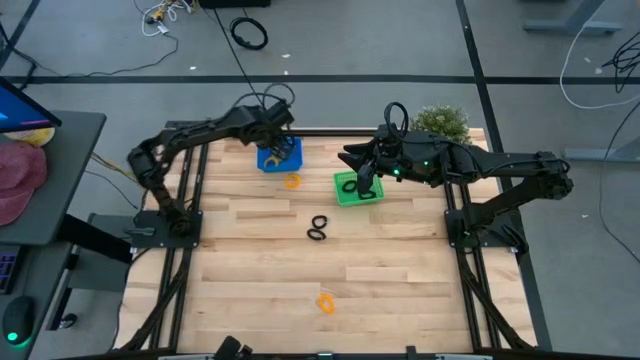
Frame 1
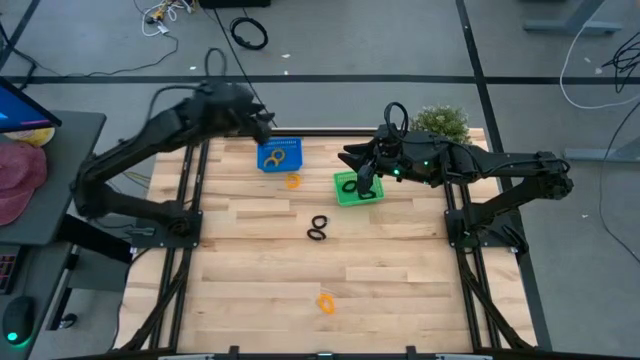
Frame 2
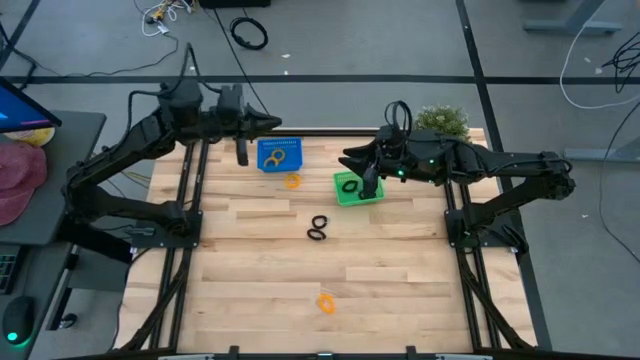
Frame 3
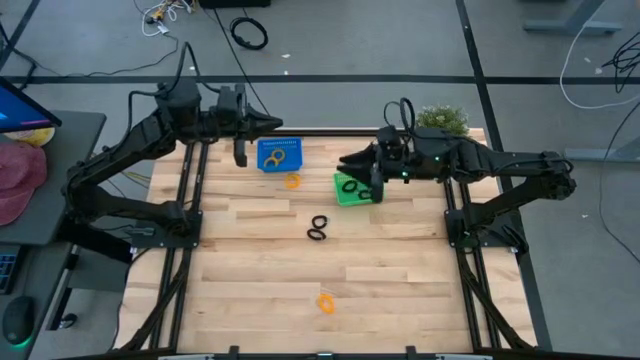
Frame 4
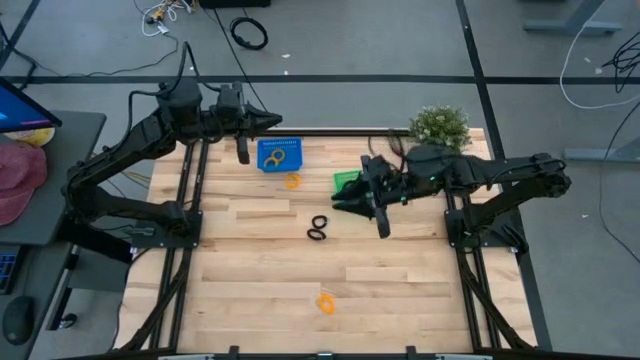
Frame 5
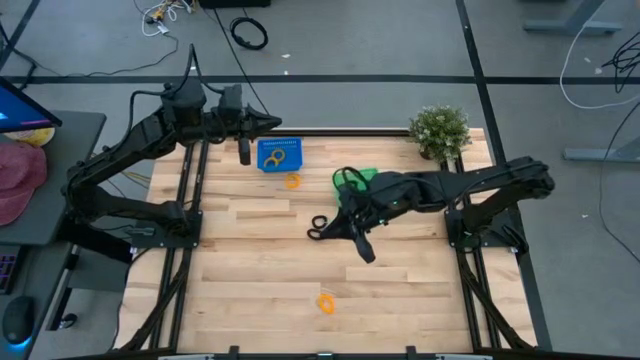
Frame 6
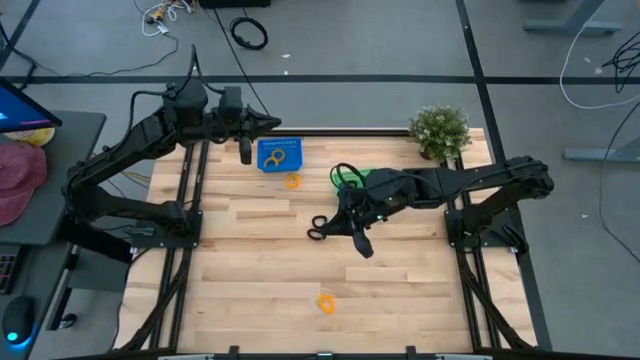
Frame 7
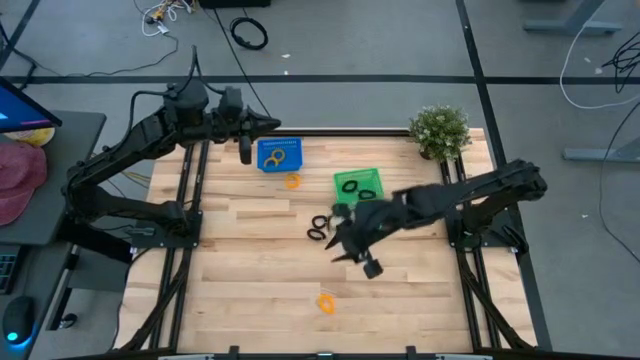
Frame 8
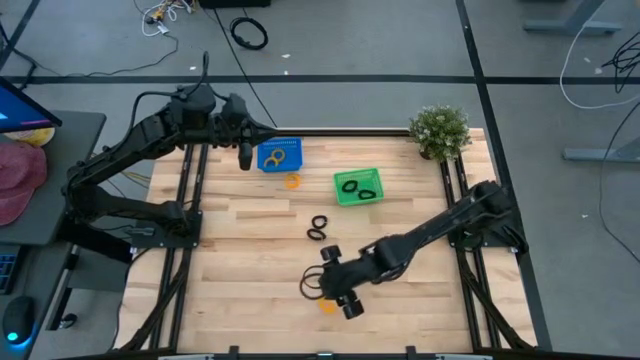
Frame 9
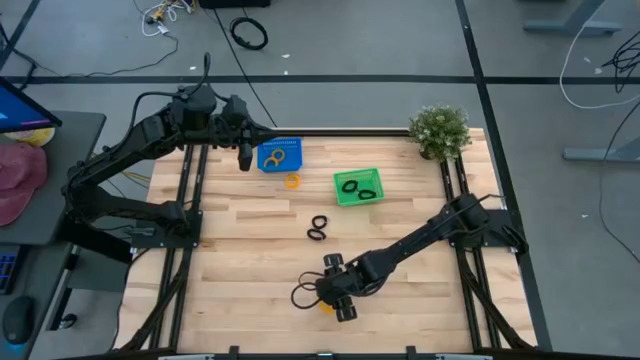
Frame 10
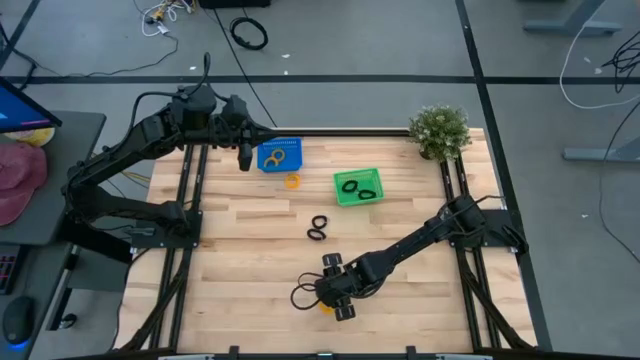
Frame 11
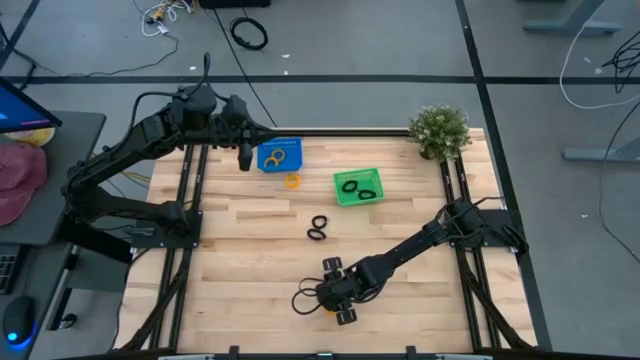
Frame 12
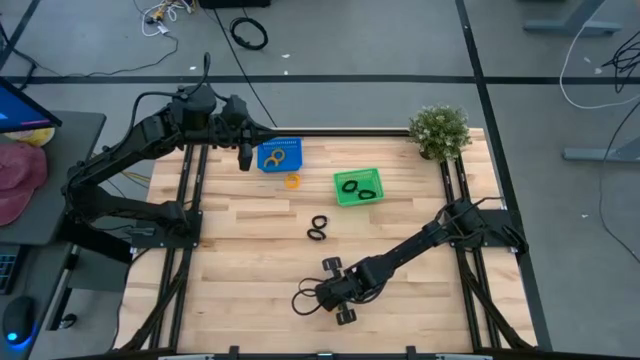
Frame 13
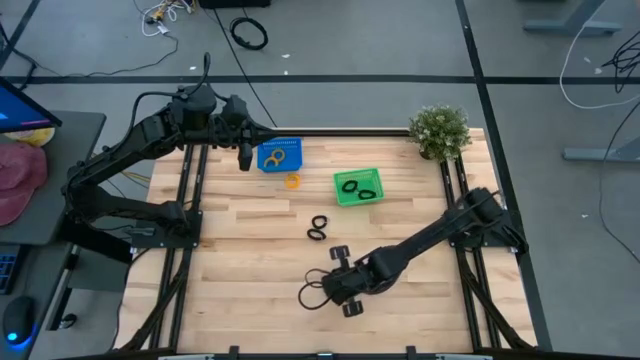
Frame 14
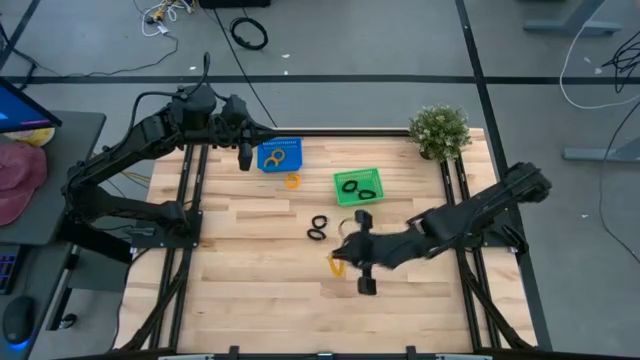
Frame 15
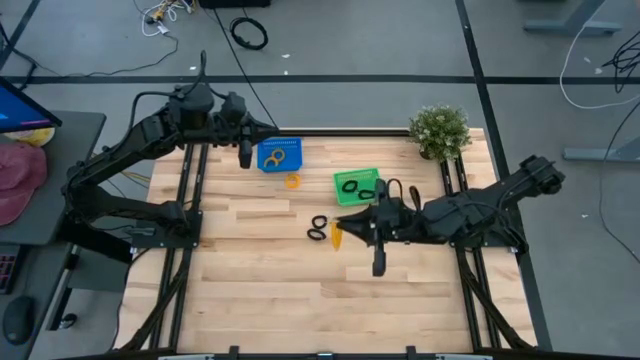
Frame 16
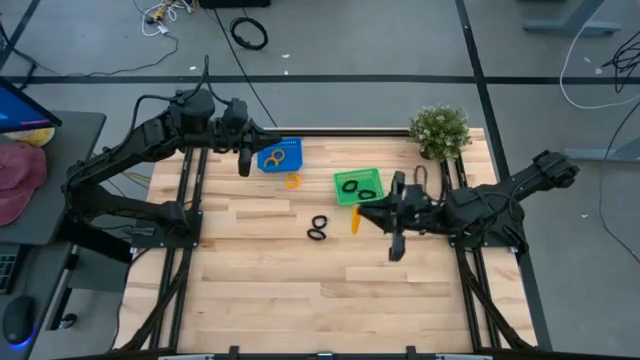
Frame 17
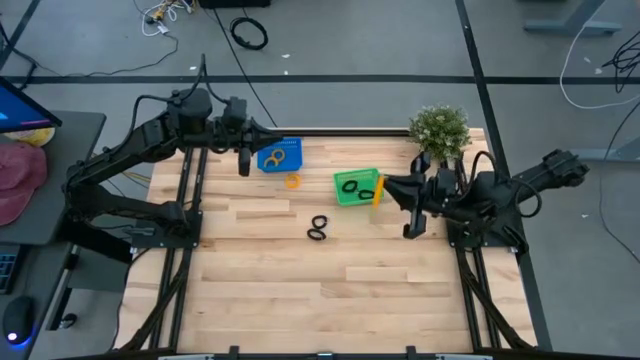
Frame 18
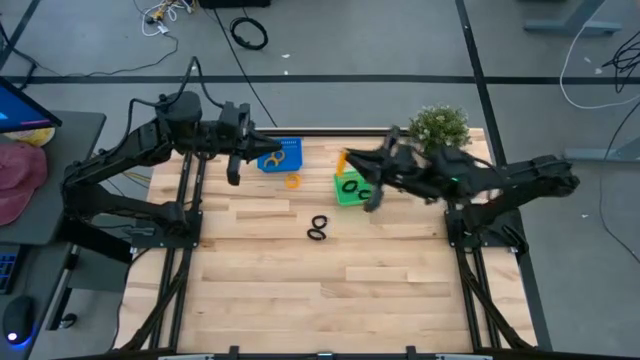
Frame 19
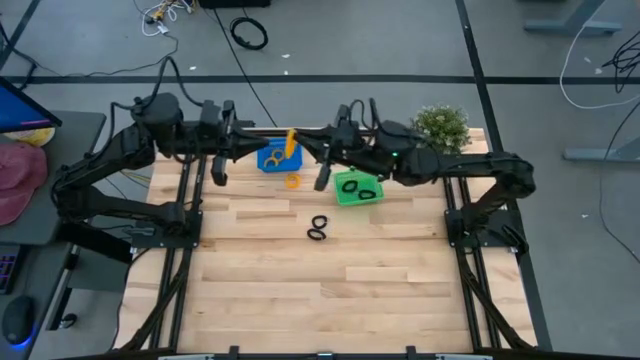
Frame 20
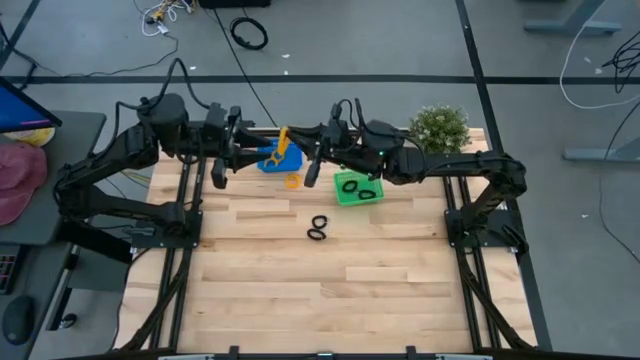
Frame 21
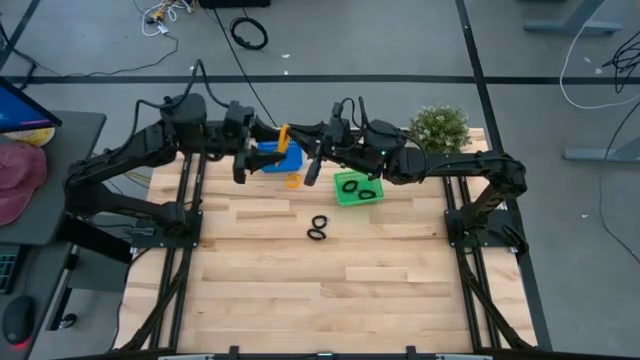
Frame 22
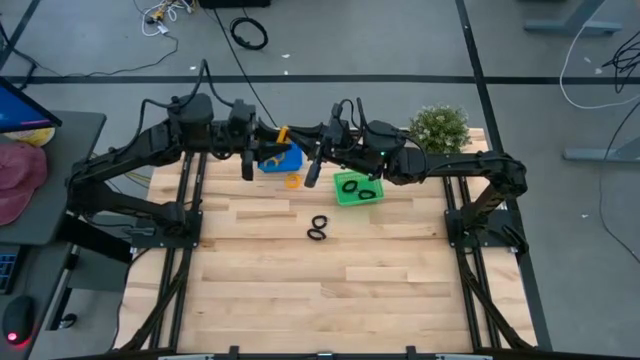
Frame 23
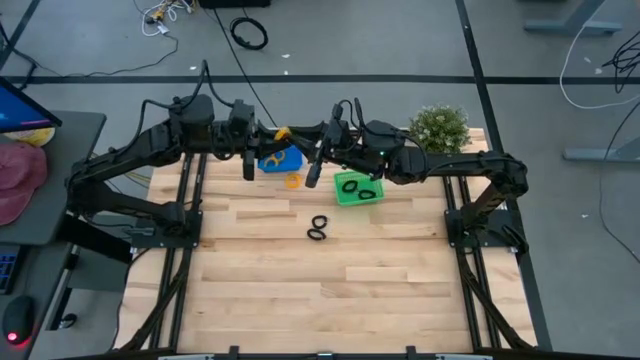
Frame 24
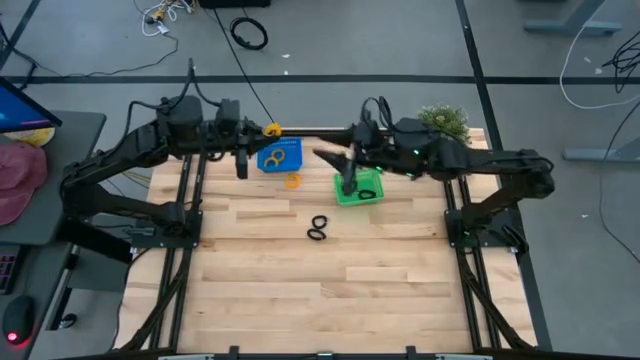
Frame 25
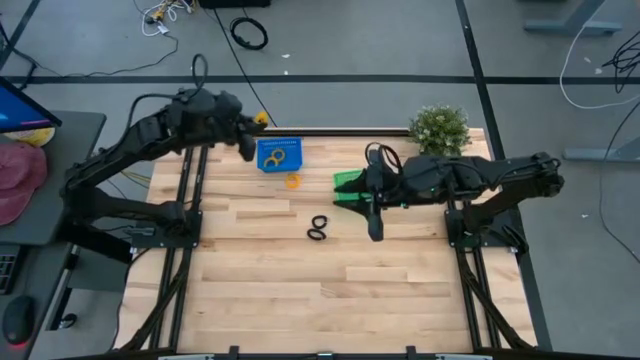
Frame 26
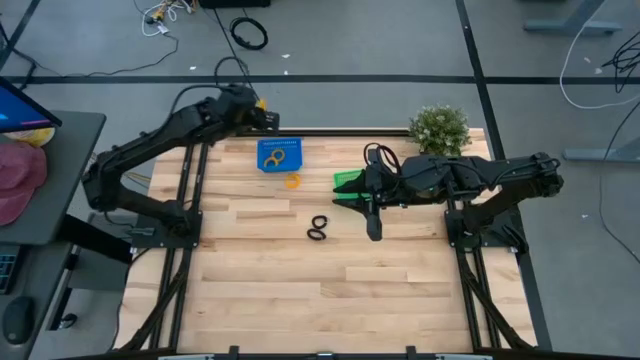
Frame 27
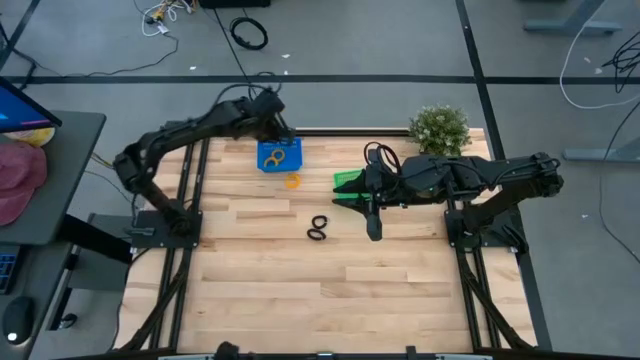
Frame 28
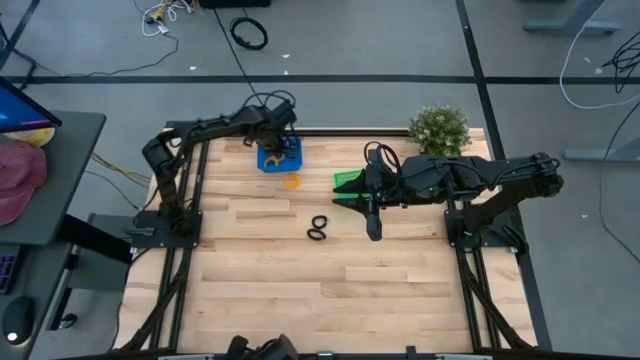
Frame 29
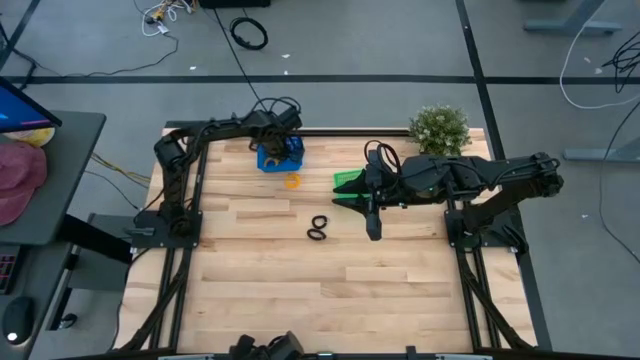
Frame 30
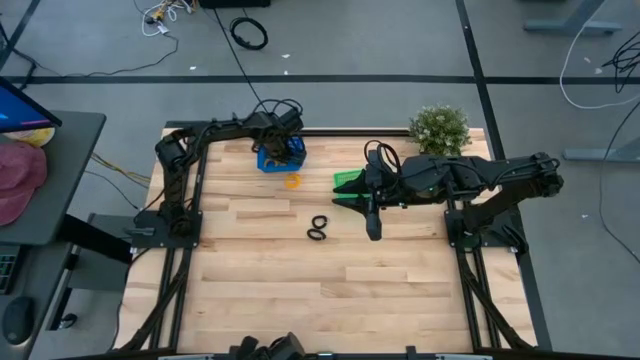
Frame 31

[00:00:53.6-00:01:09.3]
Task: Sort spring keychains
Put the yellow spring keychain into the blue bin

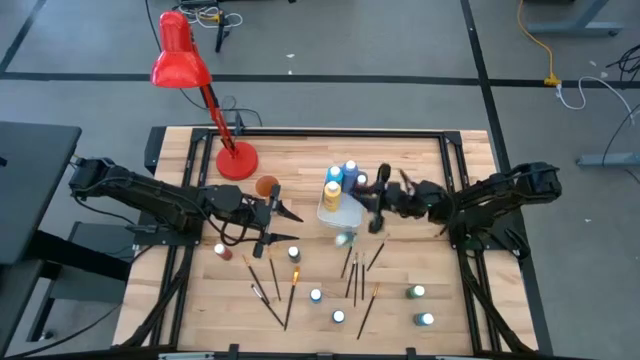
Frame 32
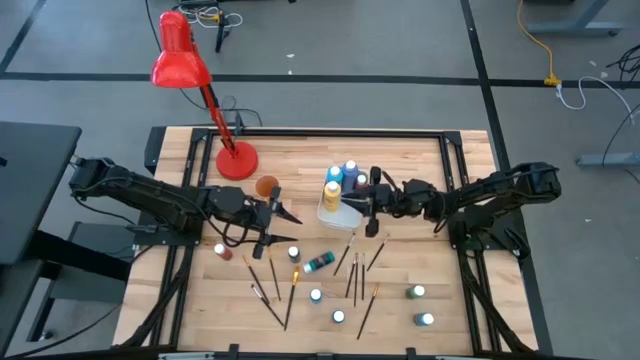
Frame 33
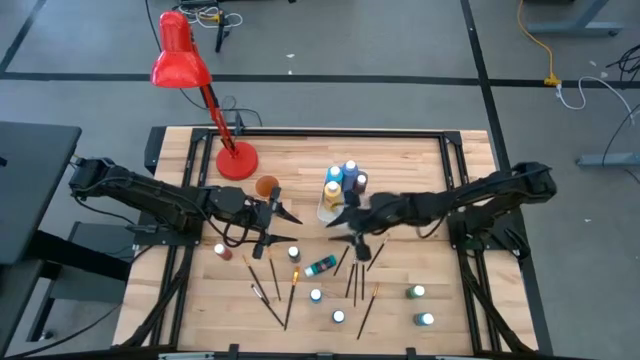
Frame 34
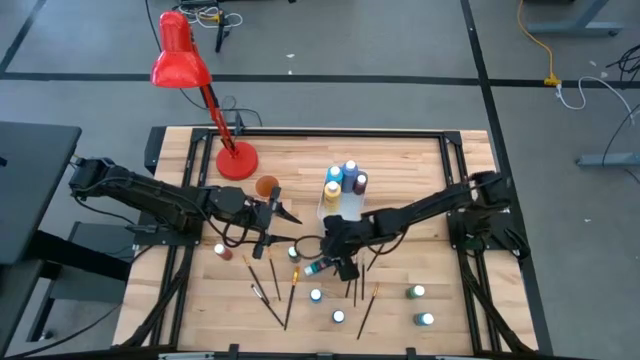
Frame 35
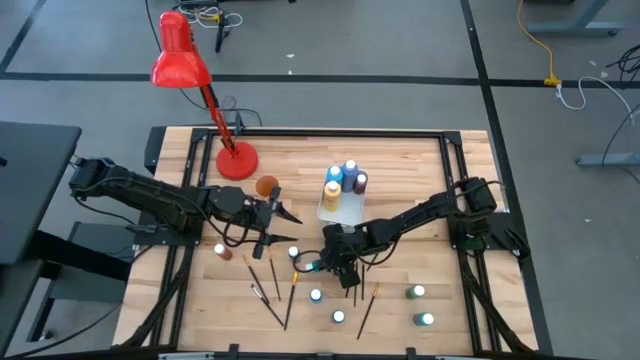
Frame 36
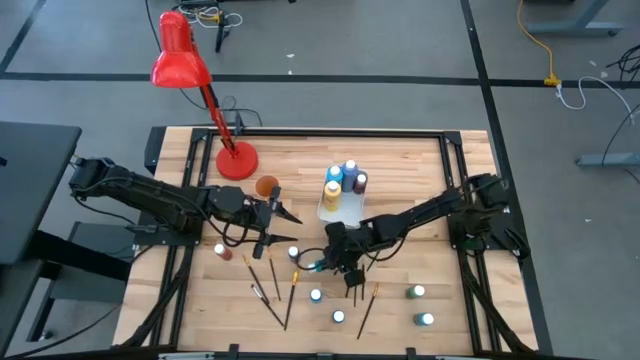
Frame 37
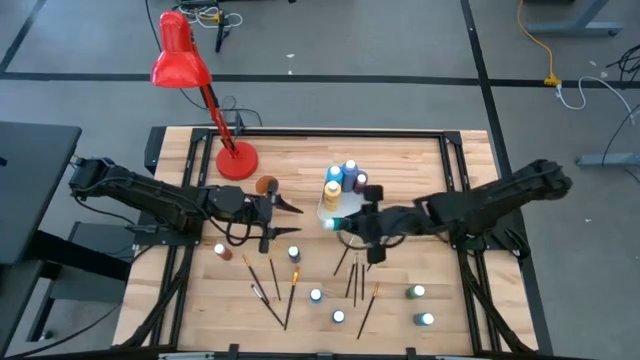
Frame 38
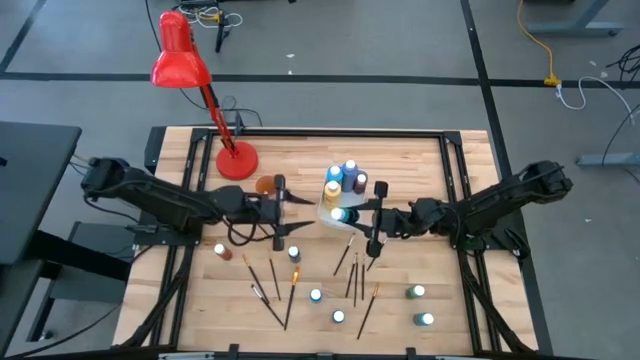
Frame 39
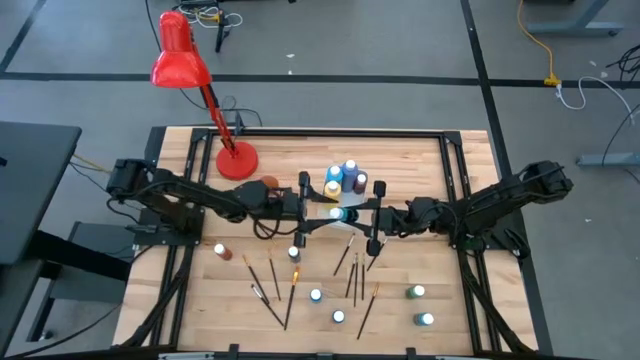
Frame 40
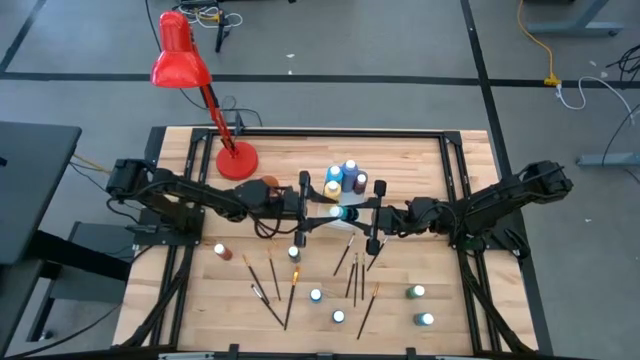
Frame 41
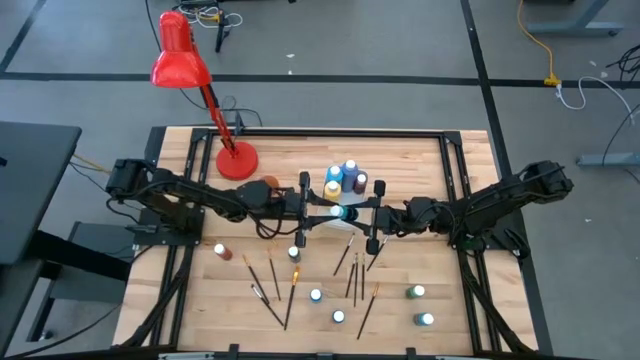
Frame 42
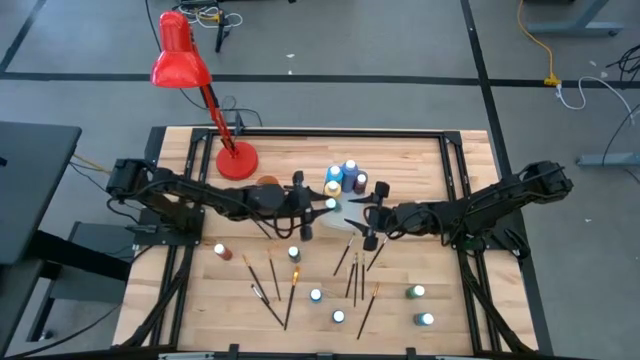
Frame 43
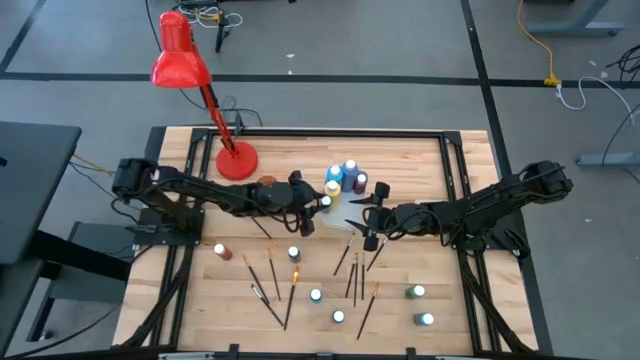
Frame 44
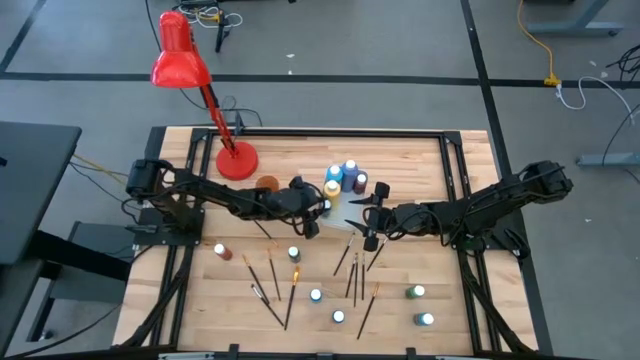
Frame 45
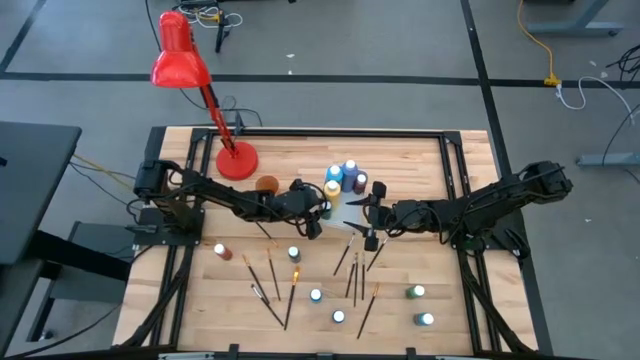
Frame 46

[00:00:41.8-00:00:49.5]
Task: Pick & Place Paint Supplies
Put the small dark green paint bottle into the white bin
